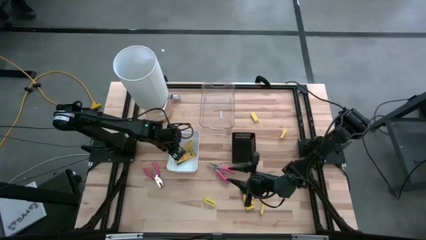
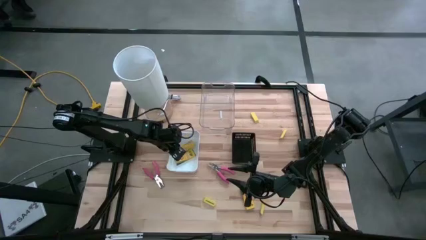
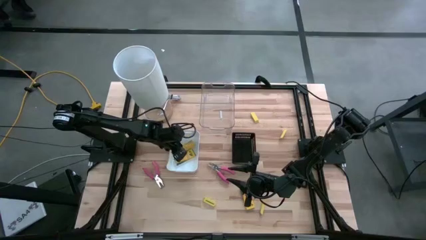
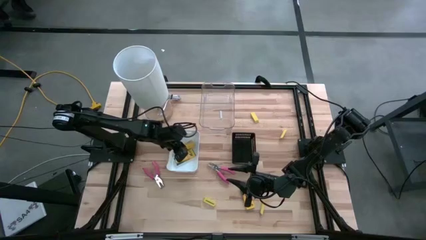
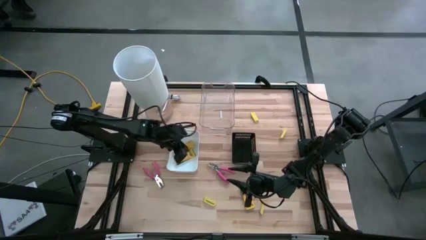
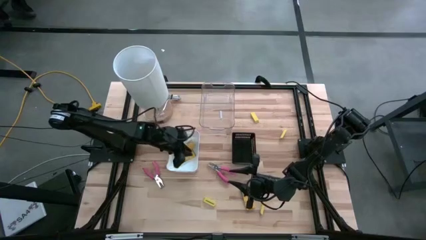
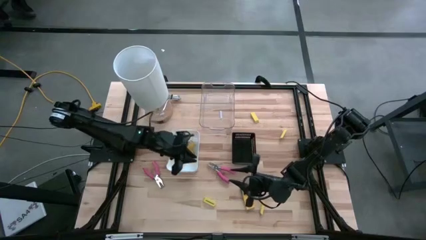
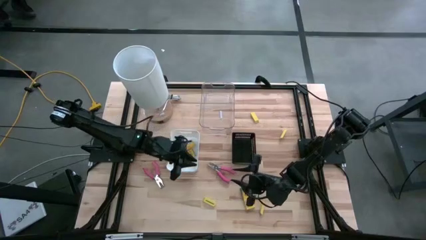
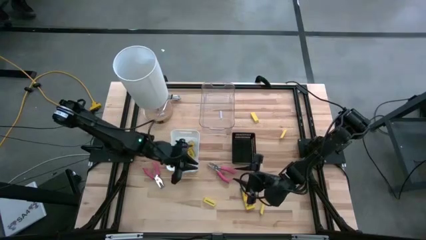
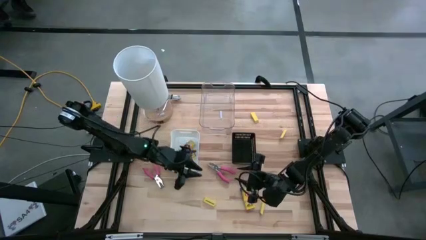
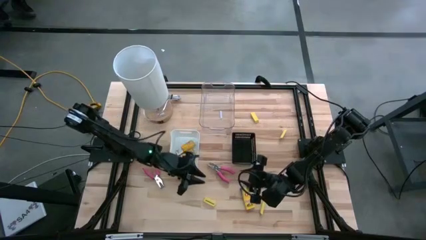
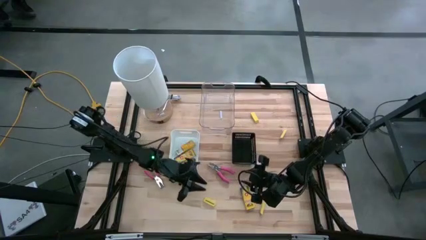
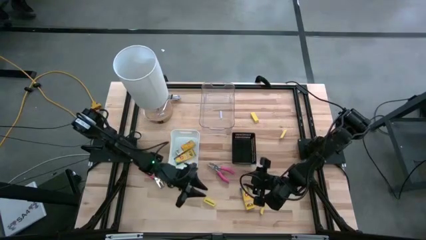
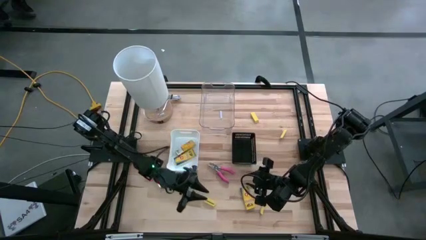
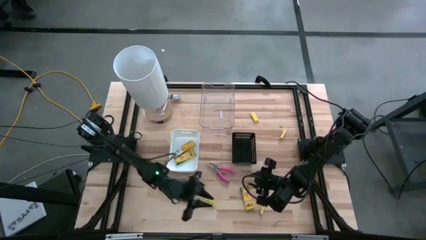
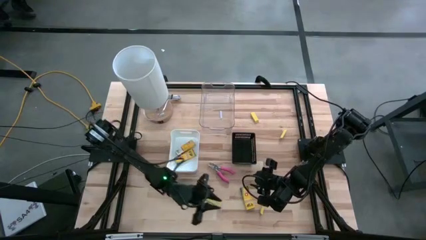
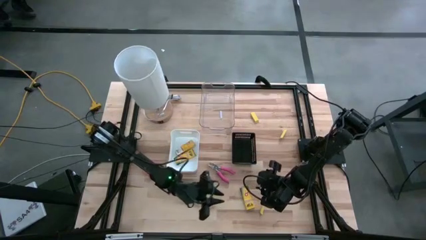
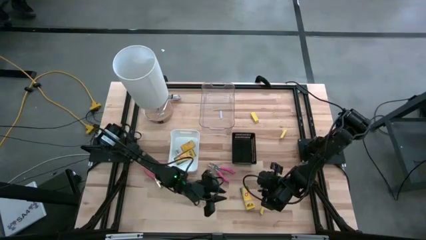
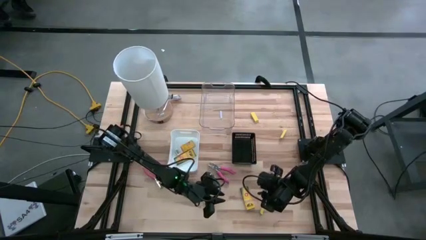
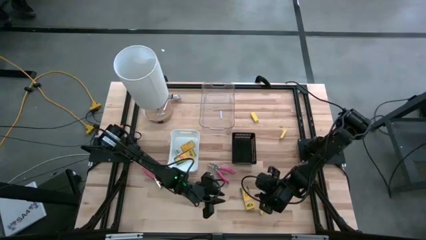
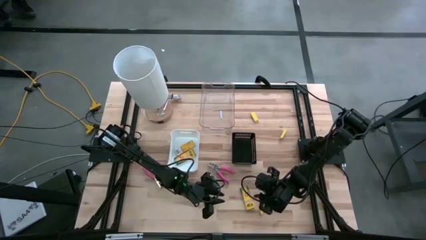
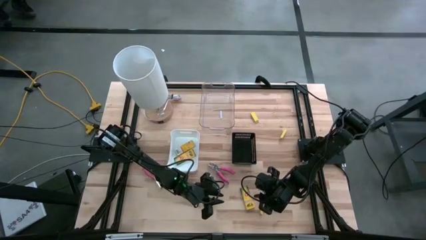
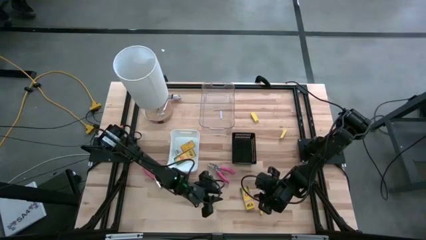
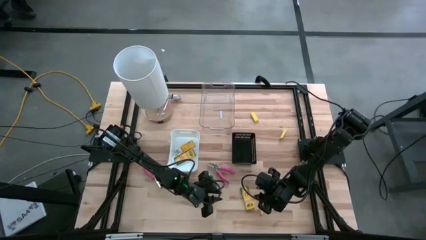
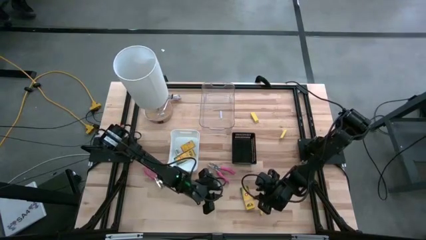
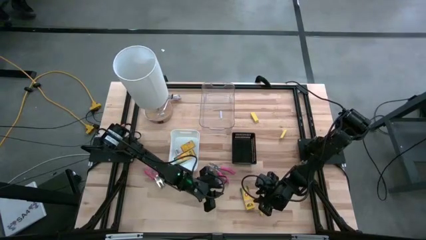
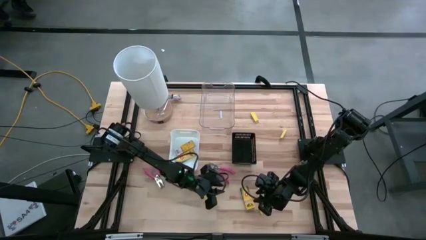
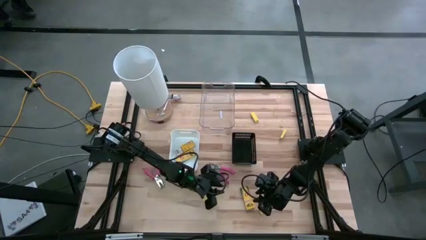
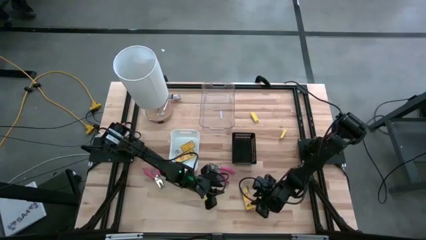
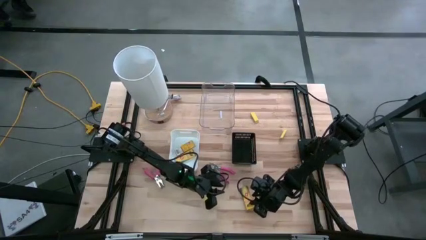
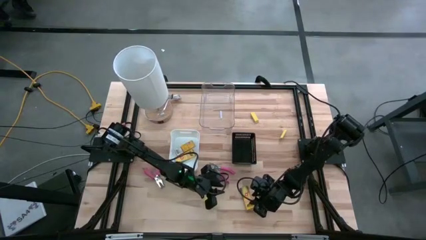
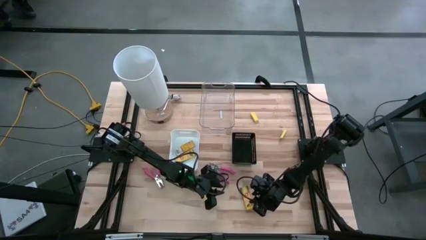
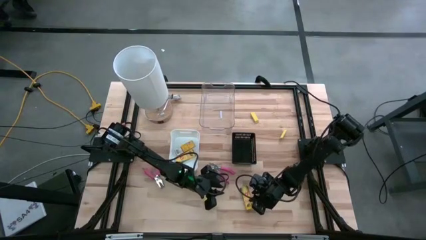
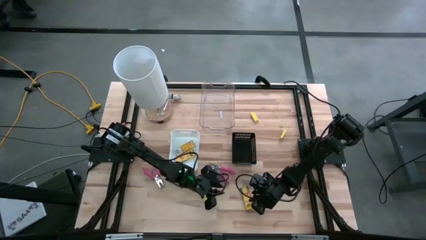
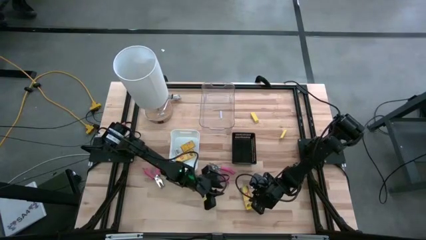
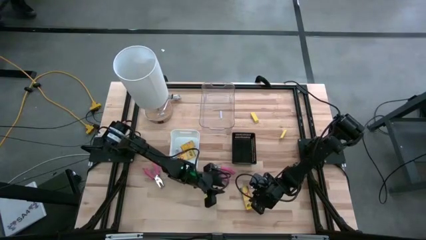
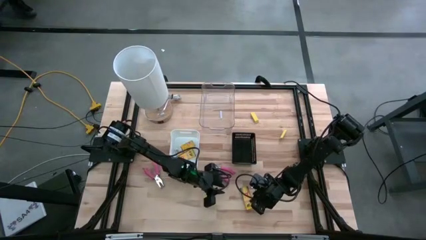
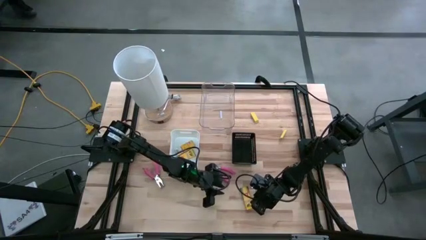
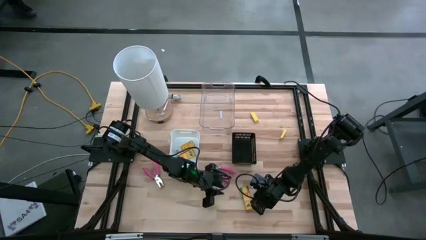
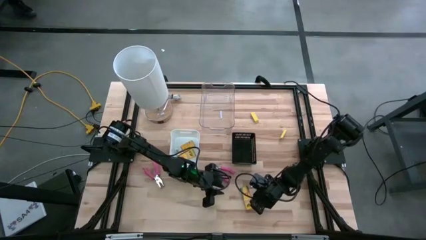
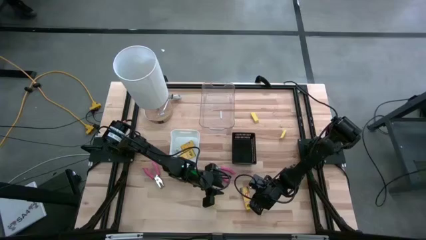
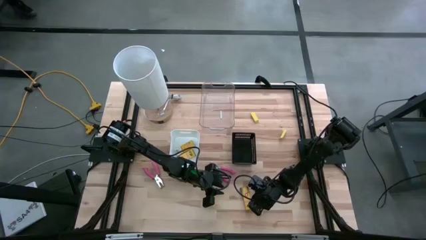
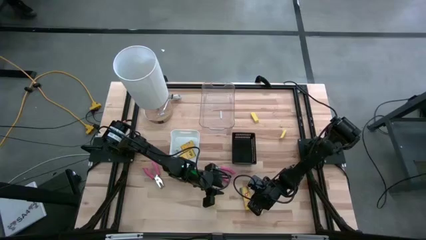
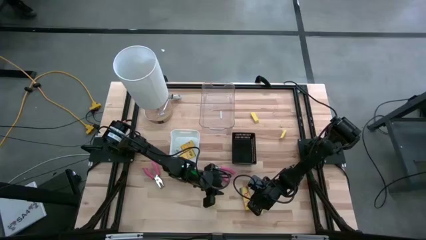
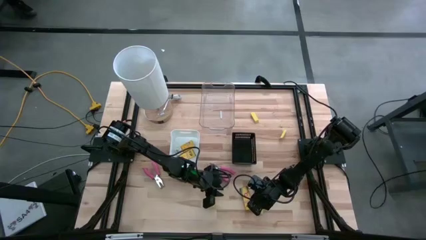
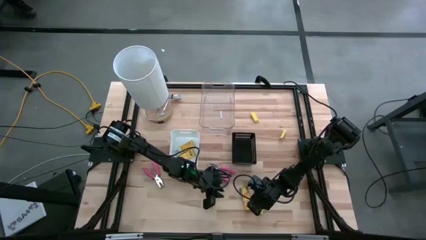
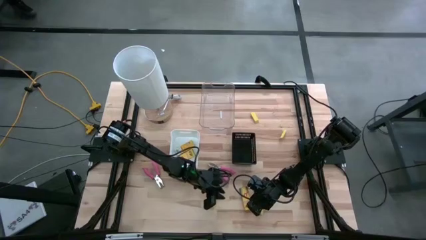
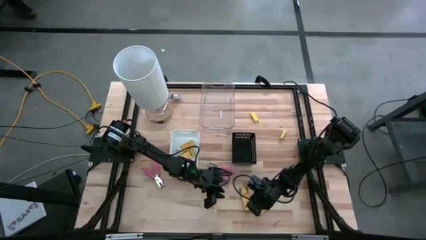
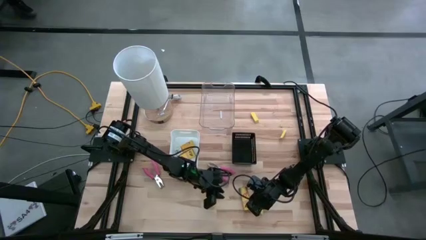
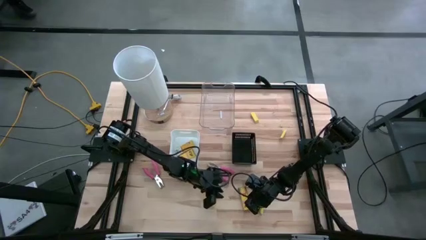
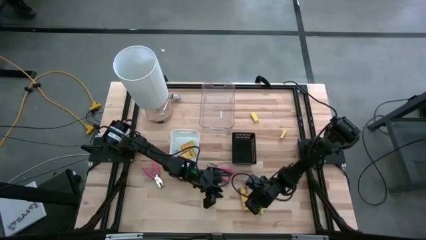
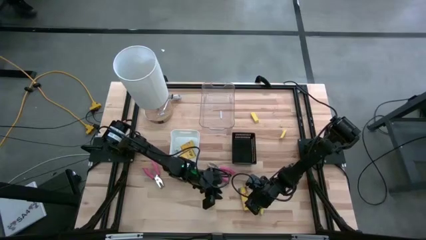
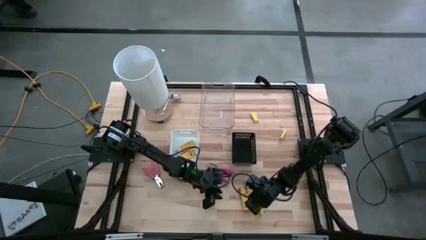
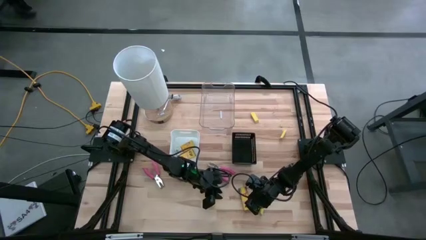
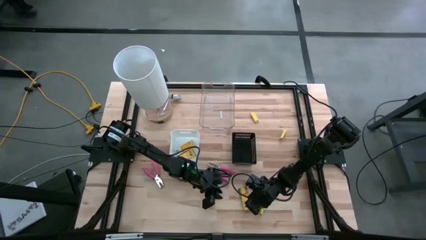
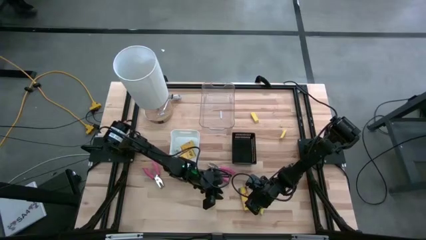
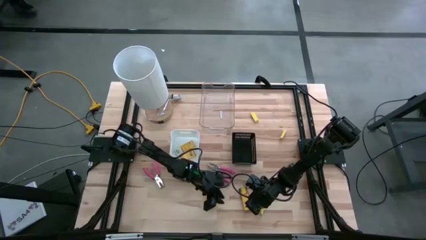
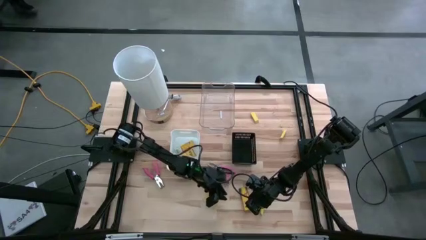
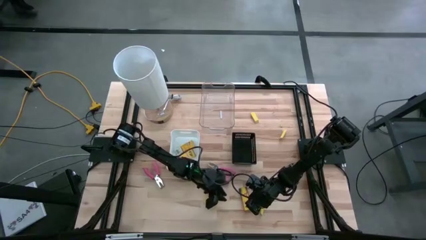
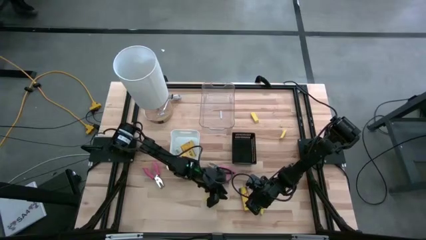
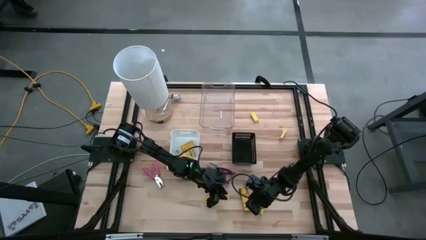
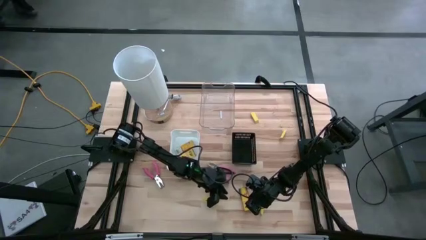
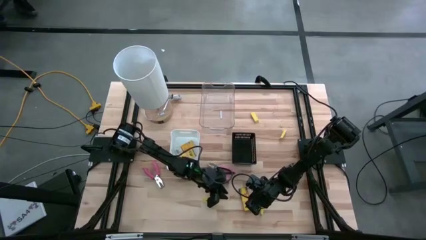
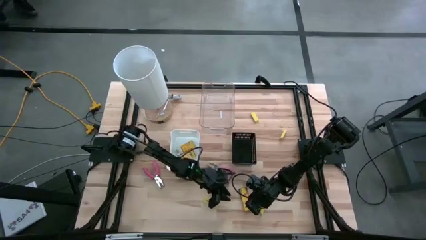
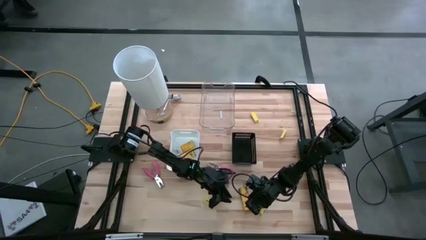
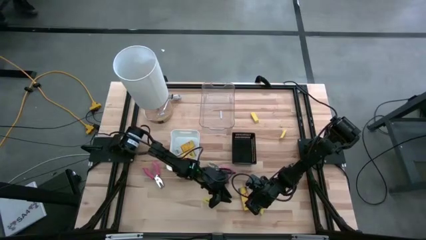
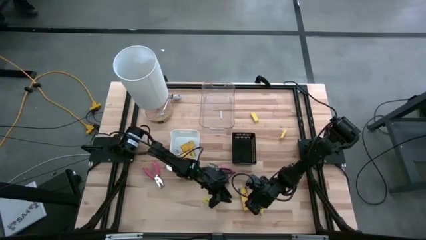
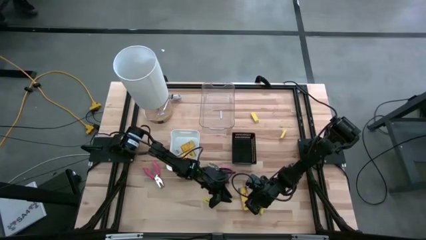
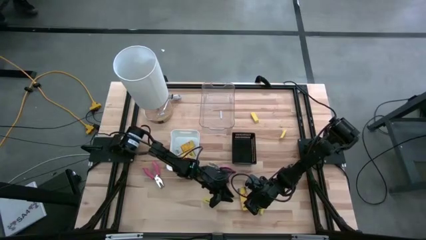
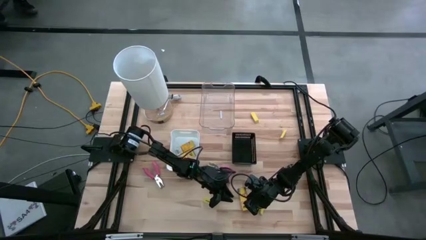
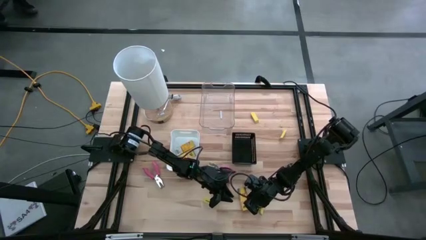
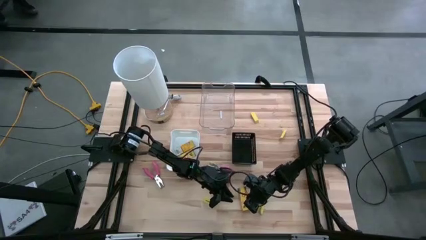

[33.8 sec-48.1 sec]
Task: Pick & Place School Supplies
Put the box of crayon into the white bin
